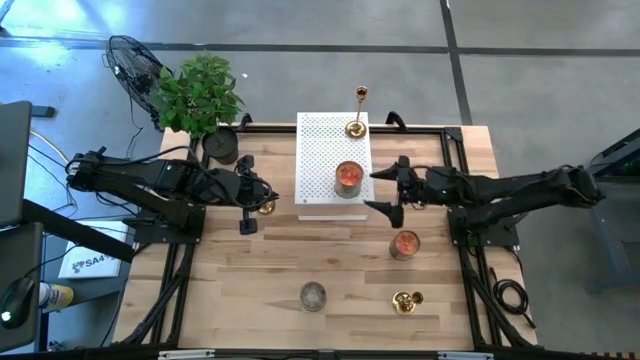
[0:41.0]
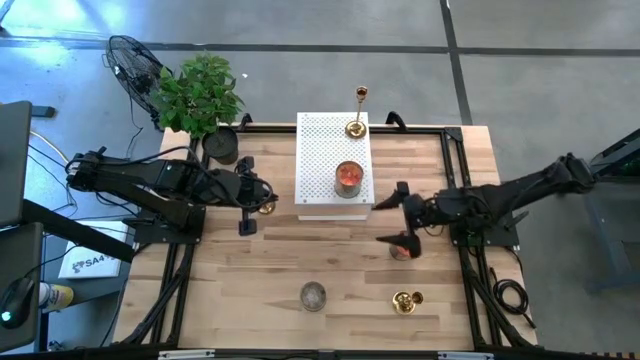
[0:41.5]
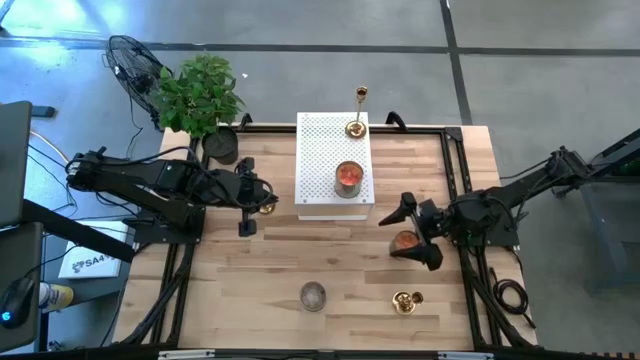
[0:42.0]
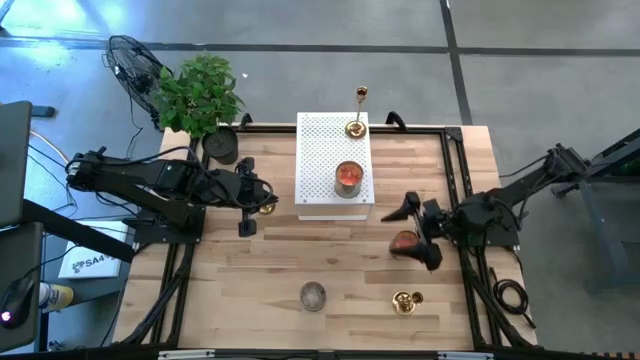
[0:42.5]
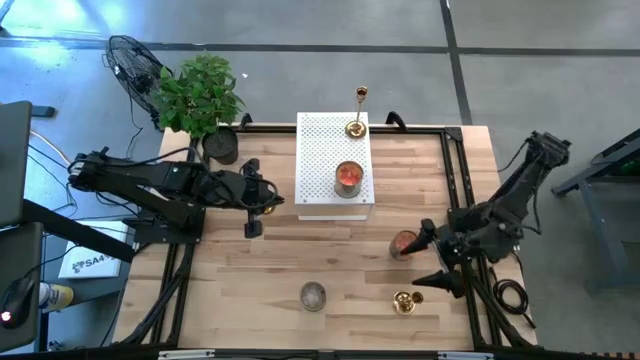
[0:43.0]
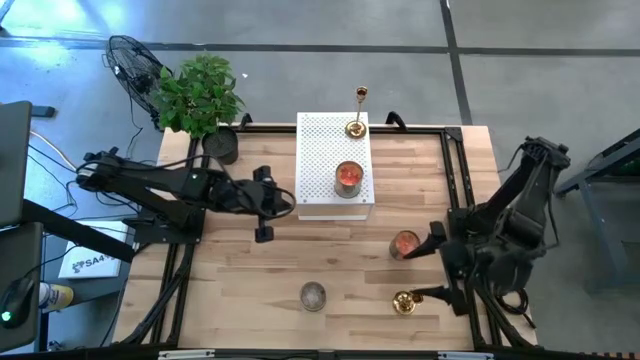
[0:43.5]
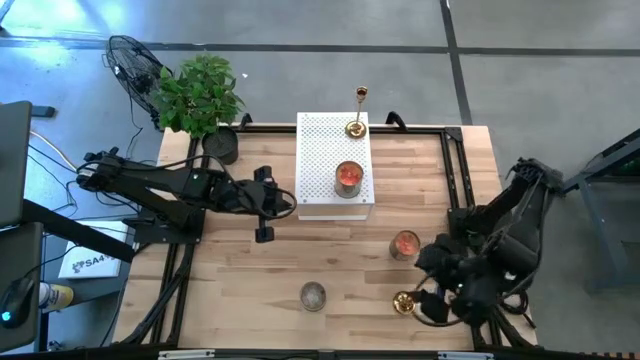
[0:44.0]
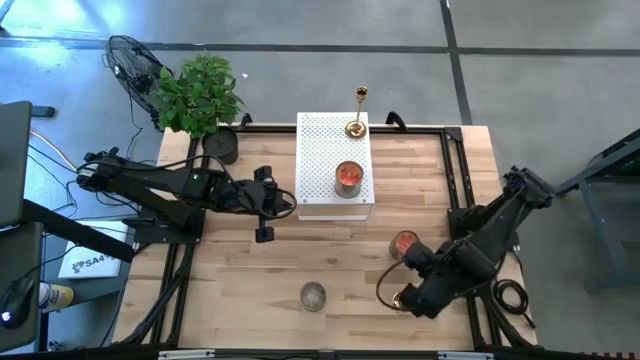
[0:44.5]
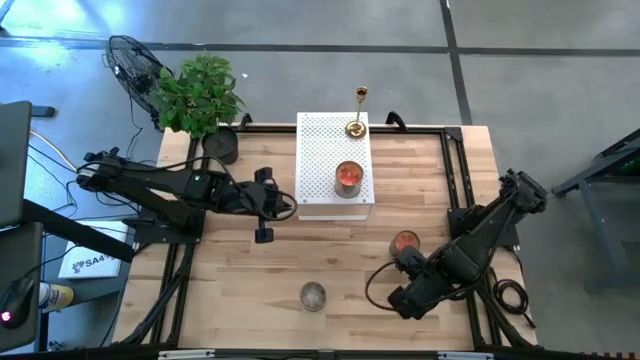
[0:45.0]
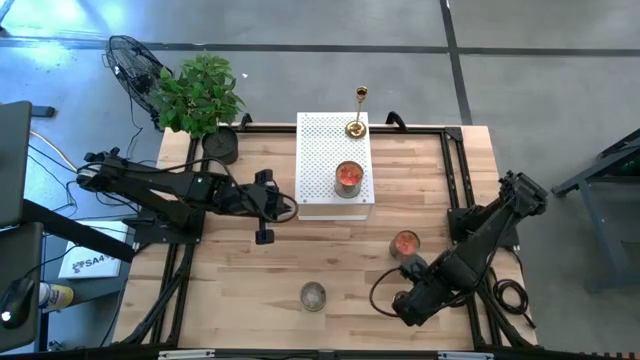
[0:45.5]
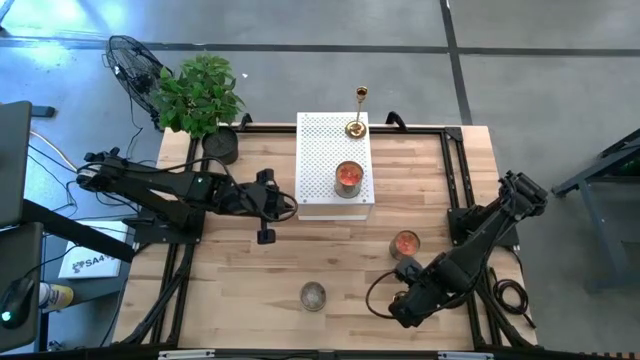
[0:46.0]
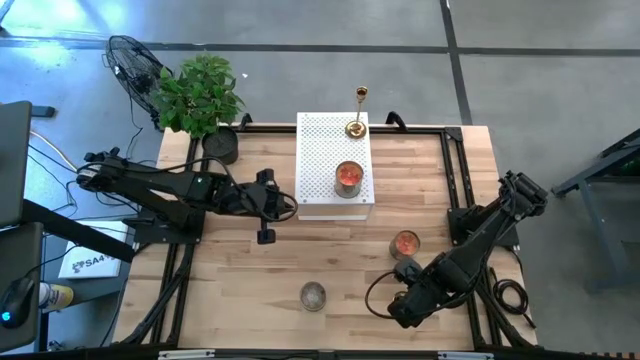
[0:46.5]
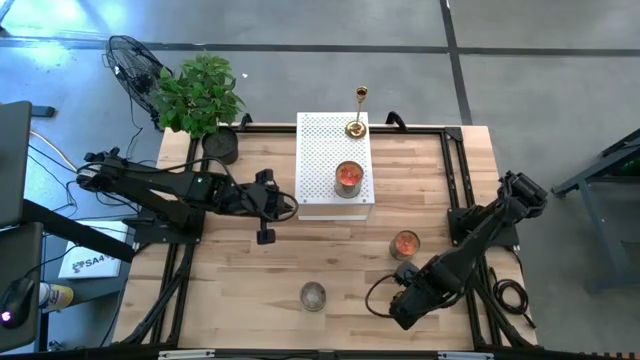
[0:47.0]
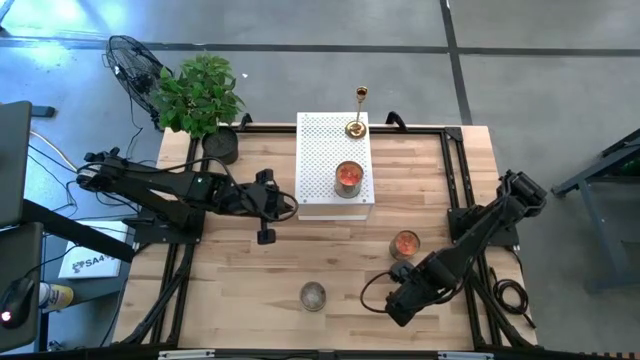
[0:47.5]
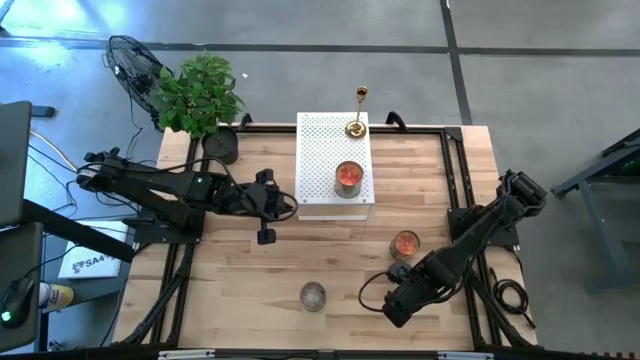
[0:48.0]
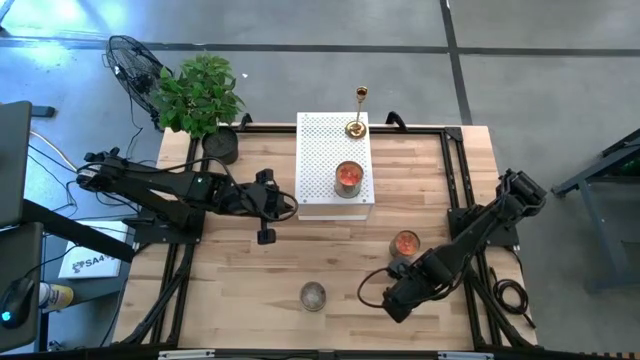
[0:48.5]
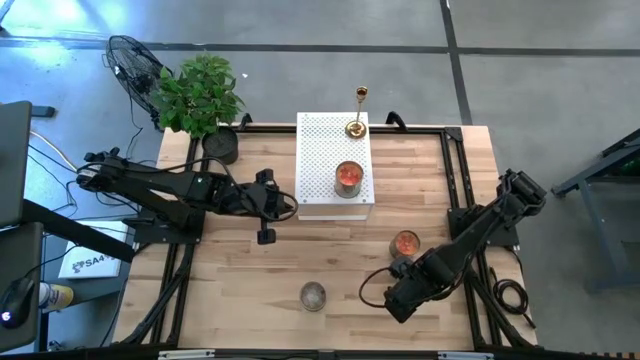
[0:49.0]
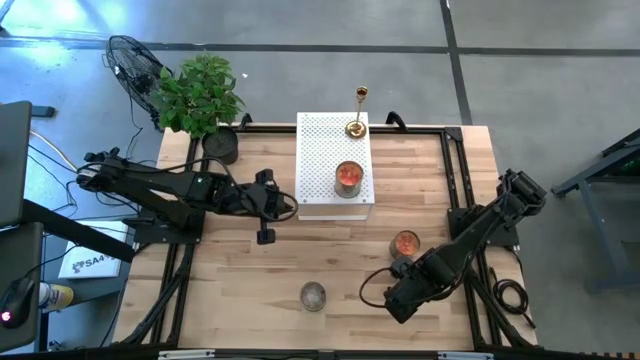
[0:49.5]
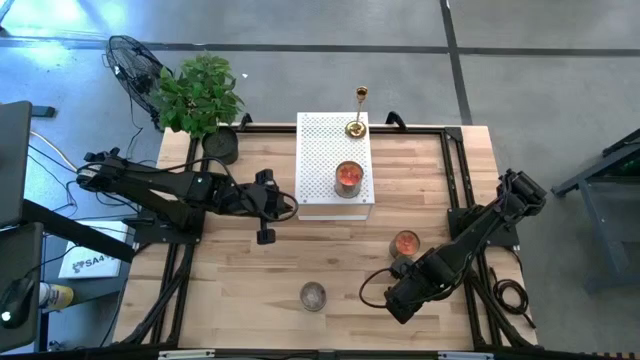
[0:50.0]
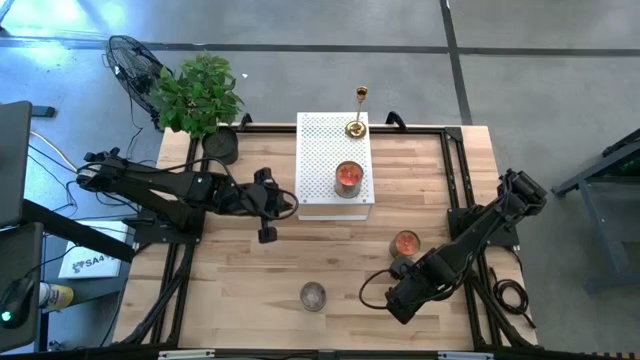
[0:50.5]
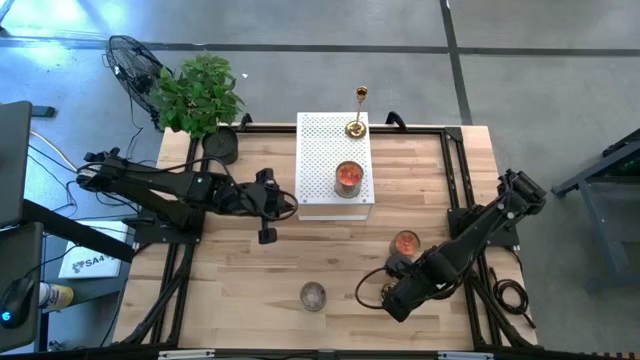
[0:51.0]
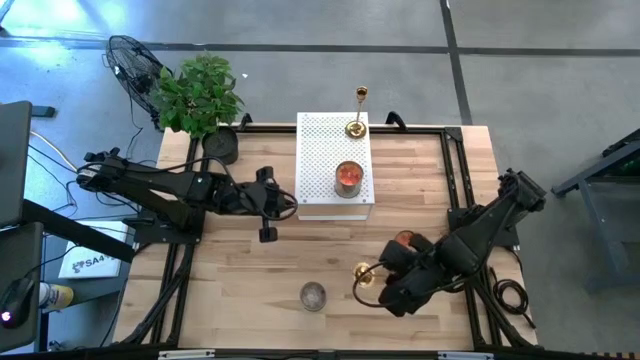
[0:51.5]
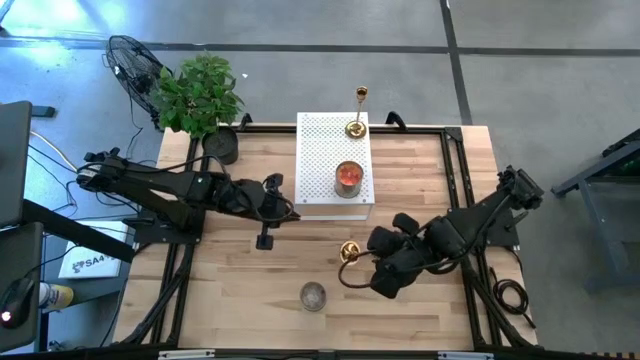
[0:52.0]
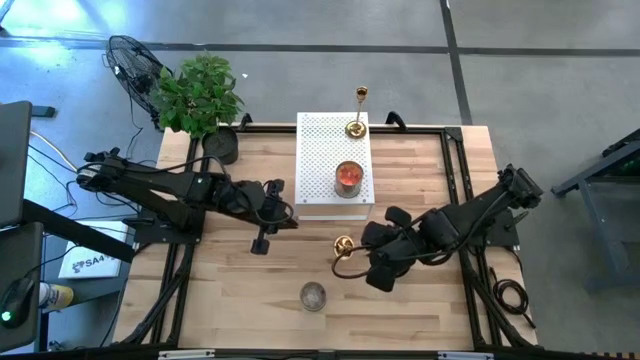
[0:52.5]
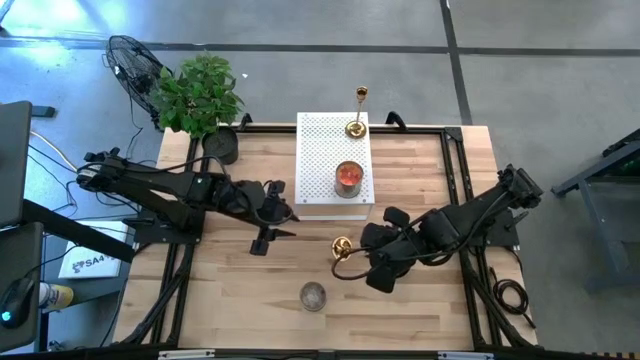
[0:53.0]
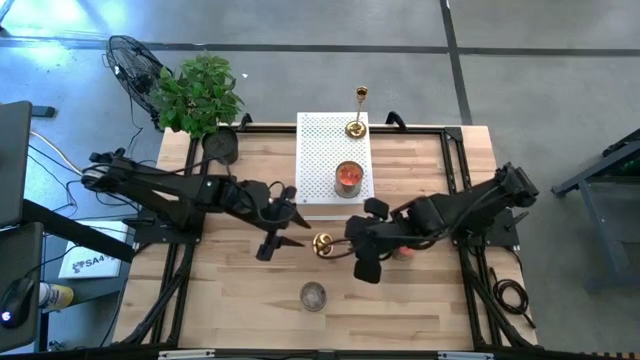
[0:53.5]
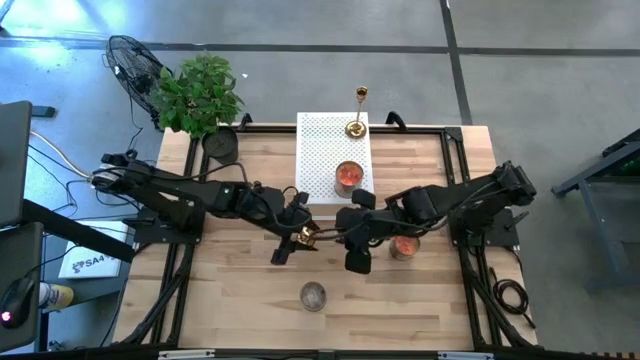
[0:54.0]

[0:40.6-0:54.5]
Task: Pick & Place candle stick holders
Put the bottom golden candle holder on the shelf

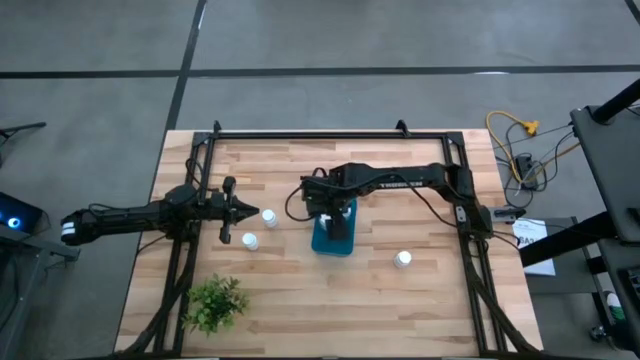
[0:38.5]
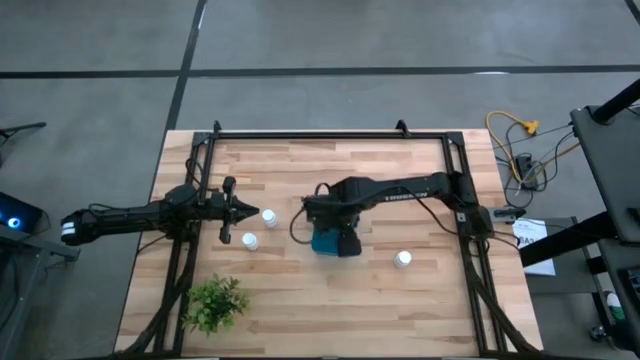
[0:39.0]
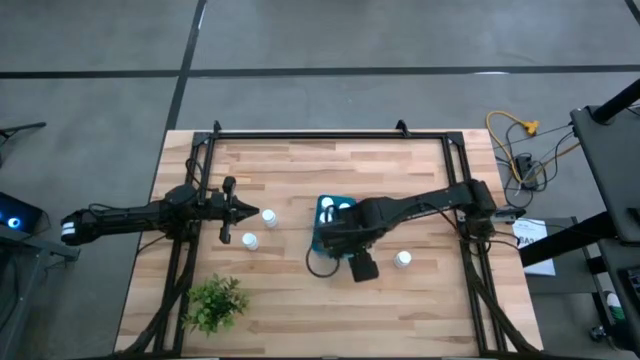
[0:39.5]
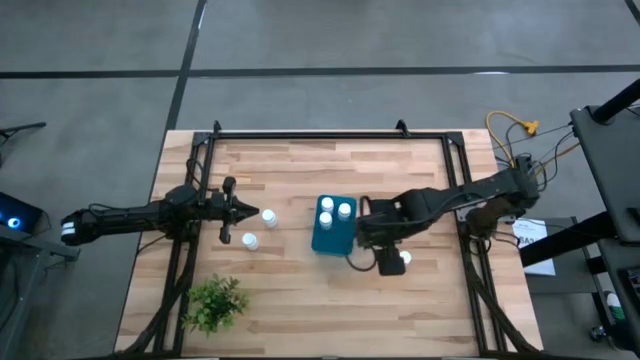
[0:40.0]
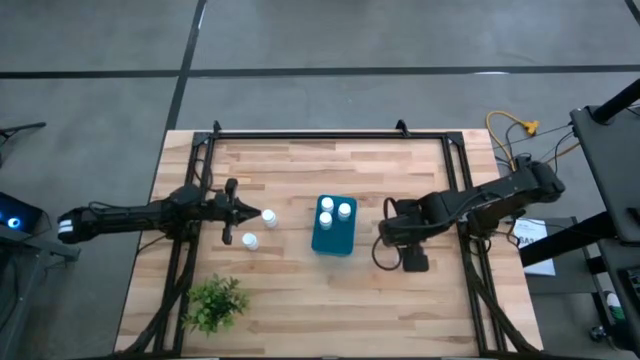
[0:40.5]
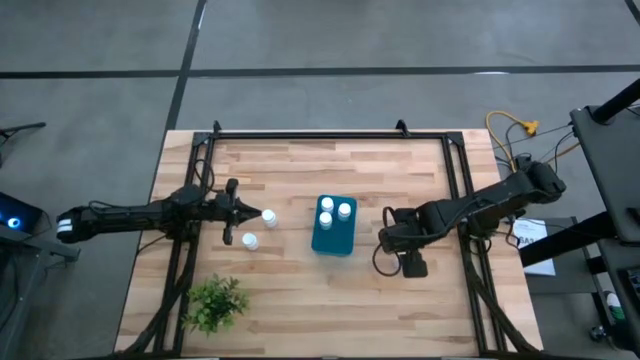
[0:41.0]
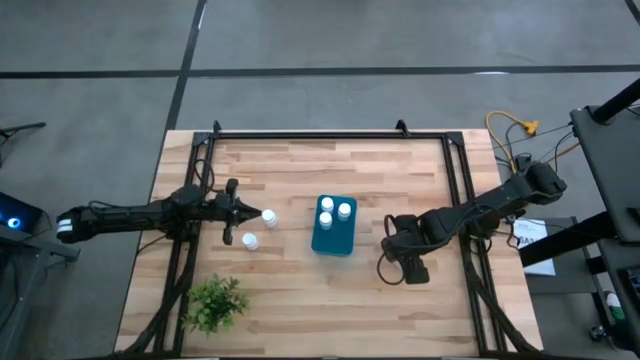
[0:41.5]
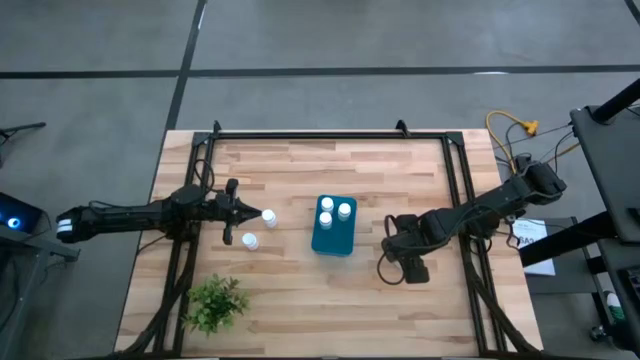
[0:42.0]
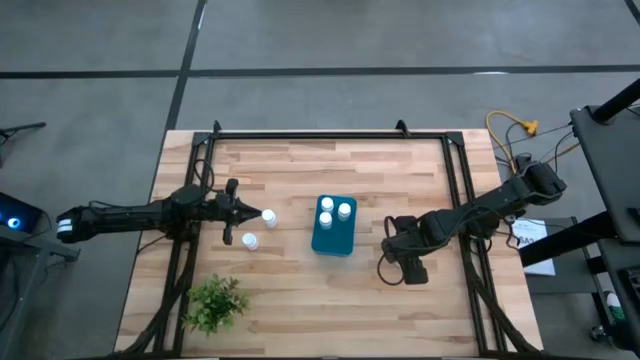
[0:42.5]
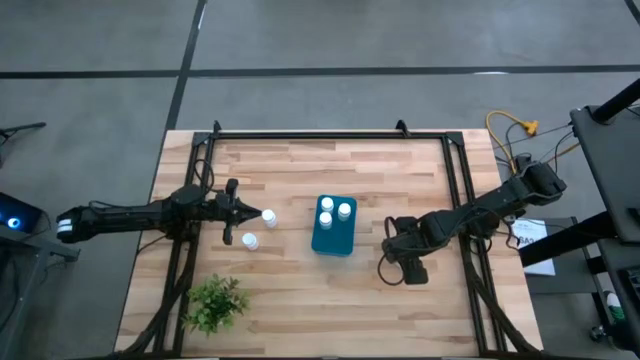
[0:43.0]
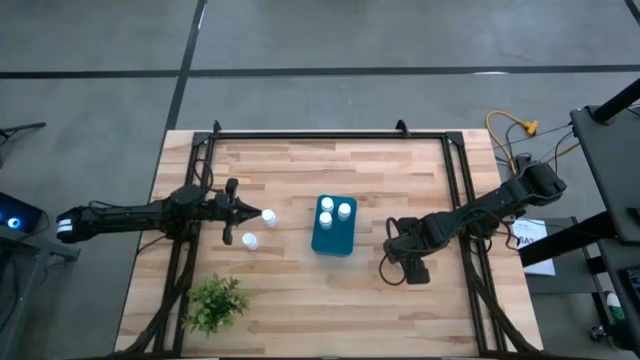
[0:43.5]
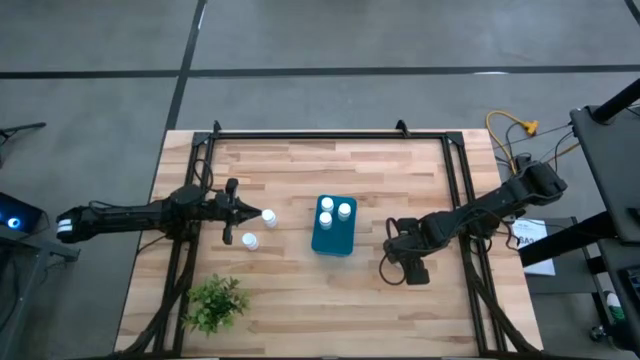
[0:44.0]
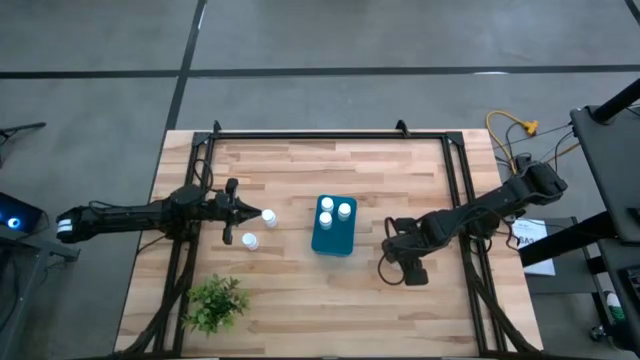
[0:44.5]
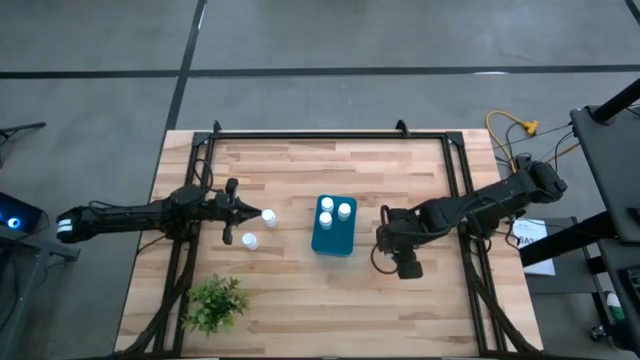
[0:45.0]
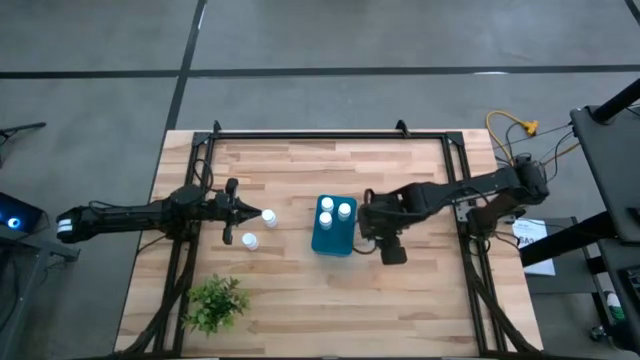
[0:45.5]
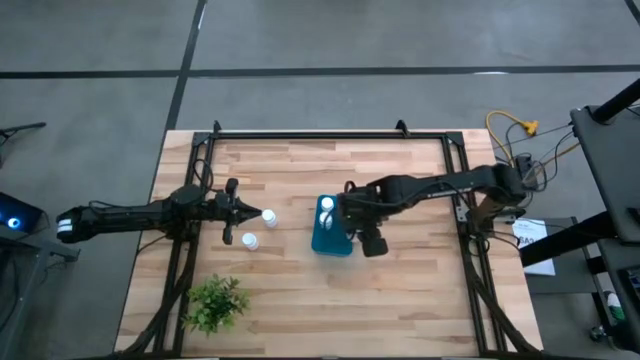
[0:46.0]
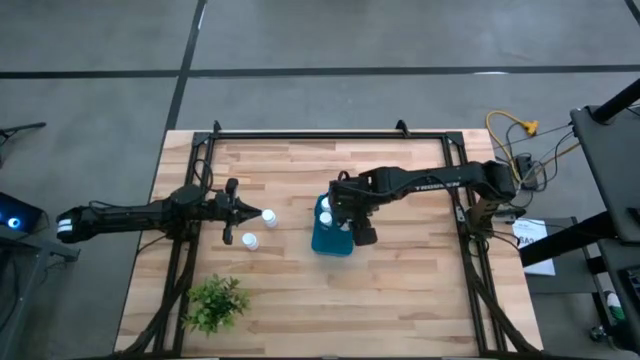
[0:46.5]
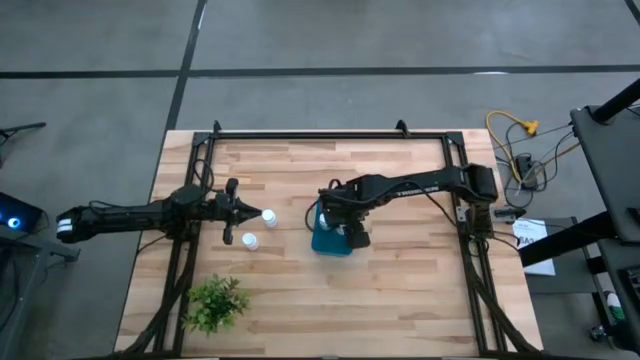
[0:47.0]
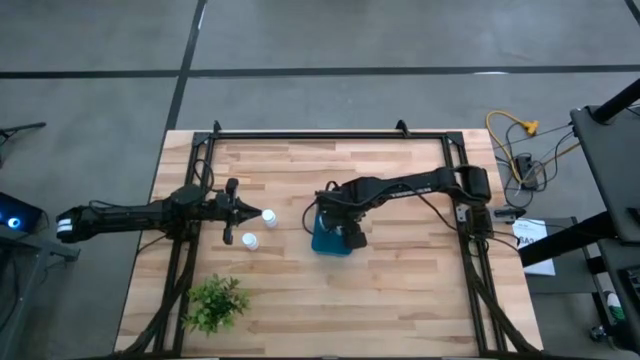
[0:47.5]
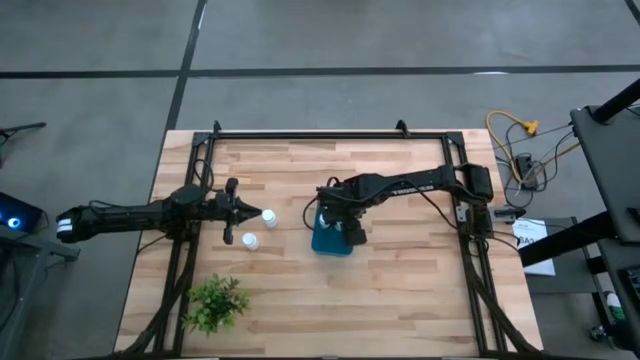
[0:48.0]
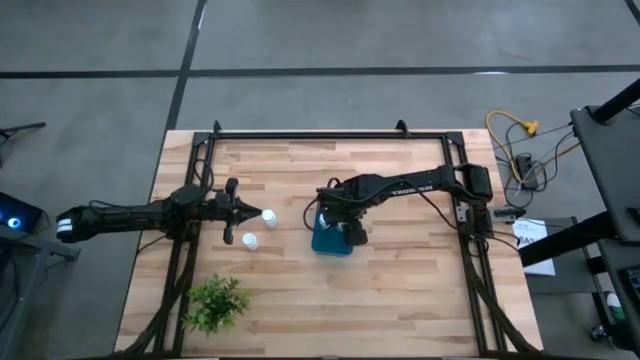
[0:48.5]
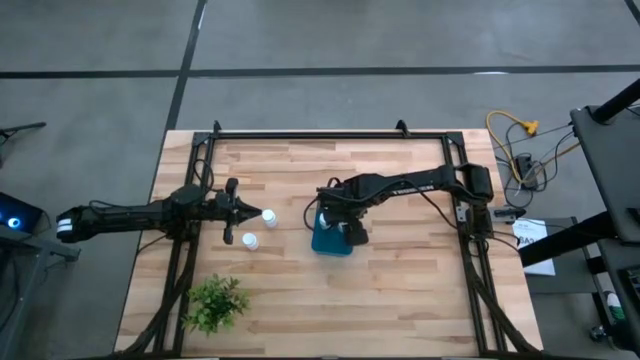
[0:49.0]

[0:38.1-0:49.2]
Task: Pick and place pill bottles into a basket
Put the medicine bottle into the blue bin
